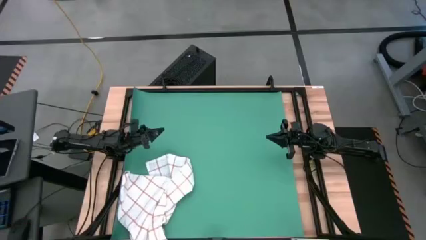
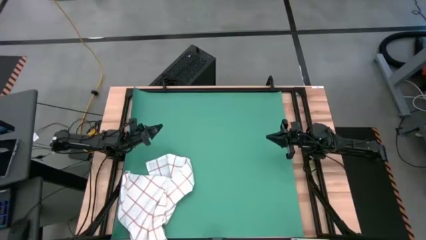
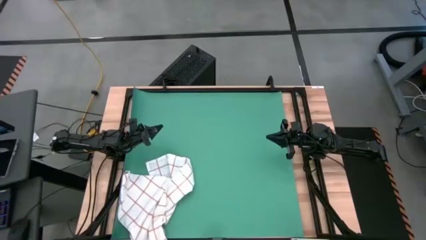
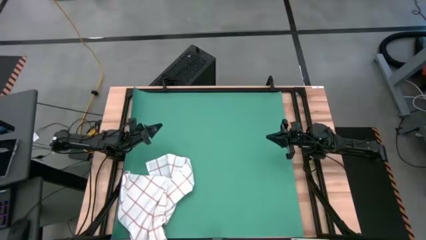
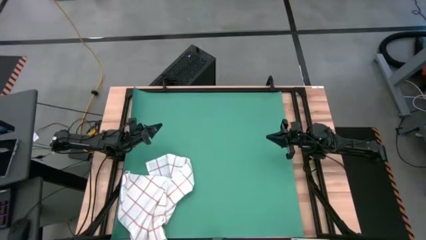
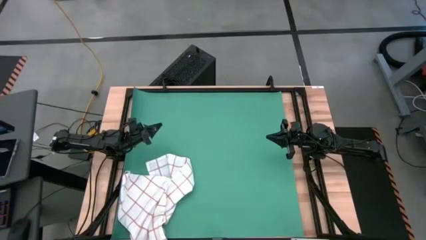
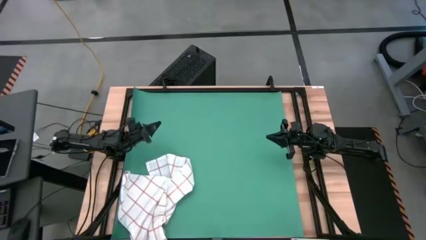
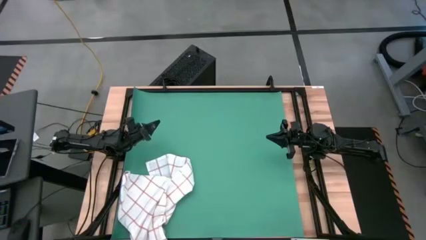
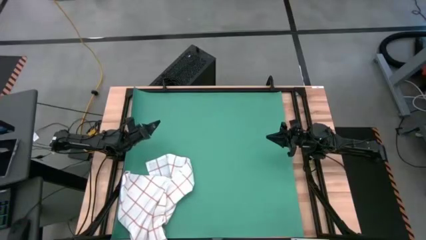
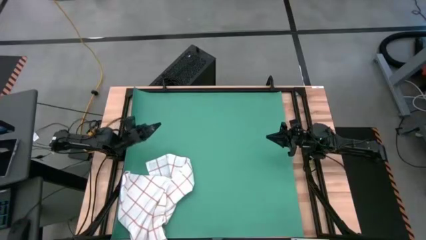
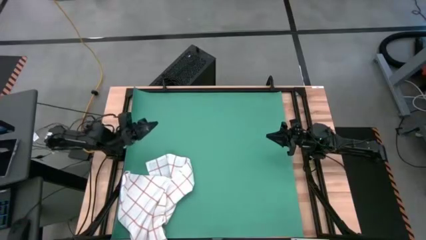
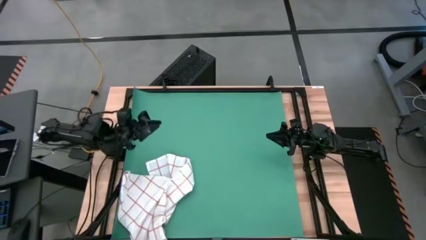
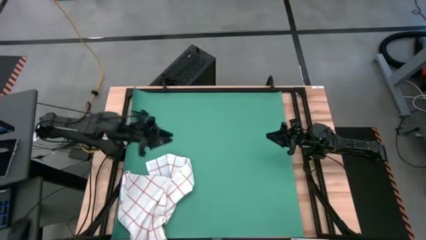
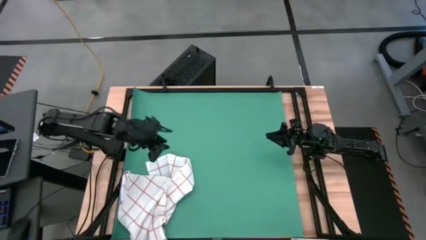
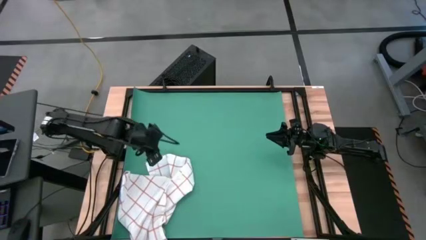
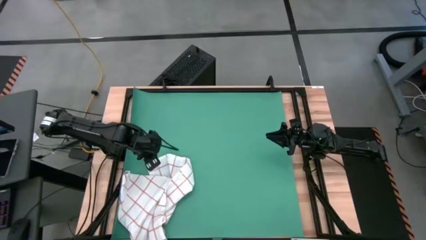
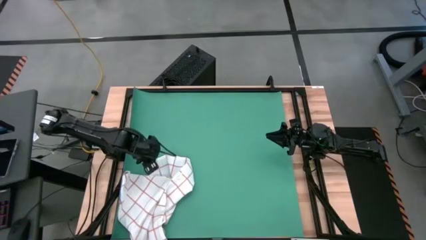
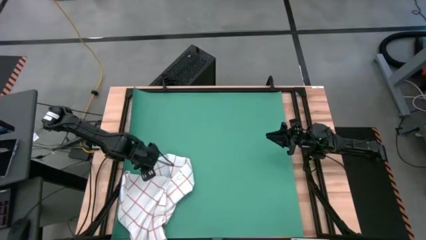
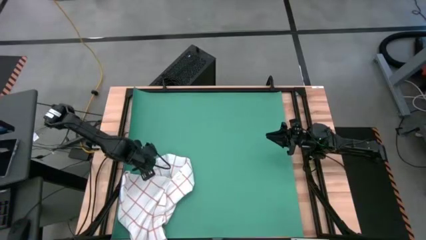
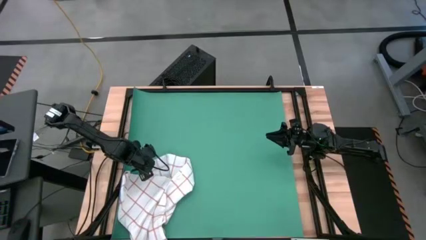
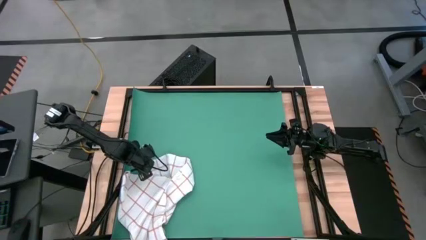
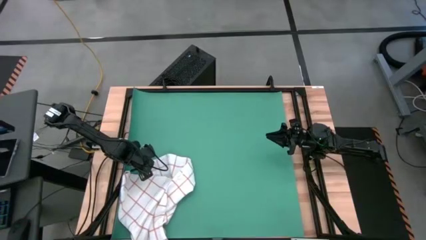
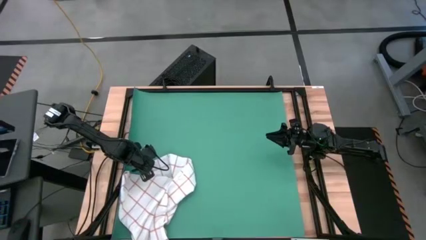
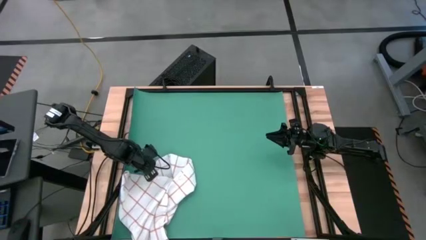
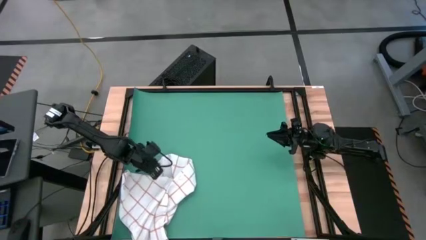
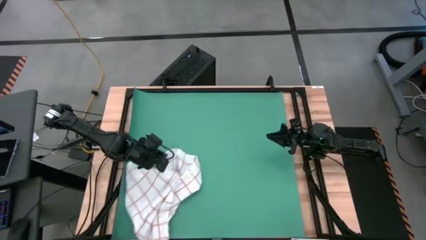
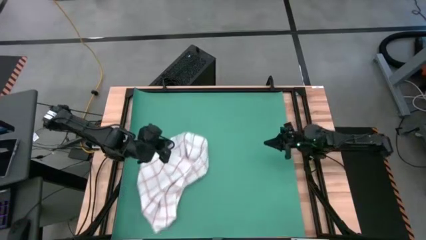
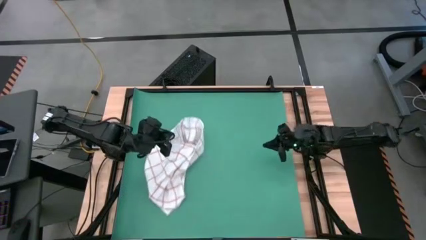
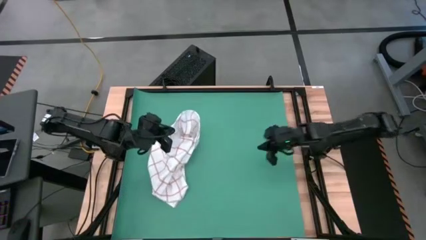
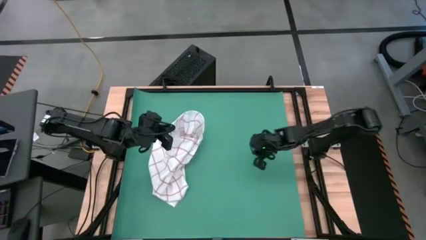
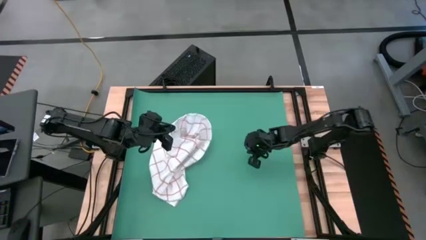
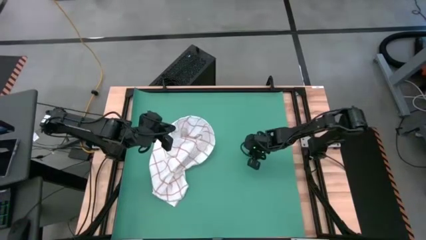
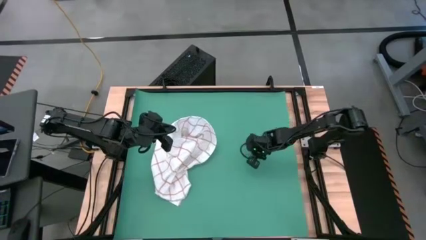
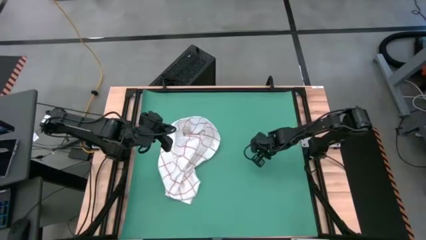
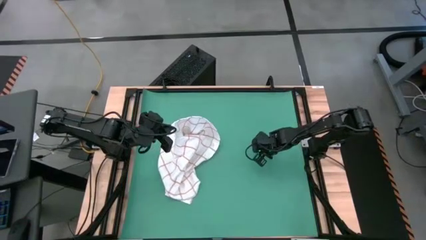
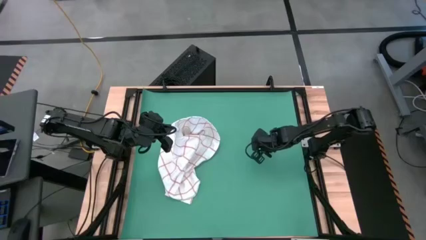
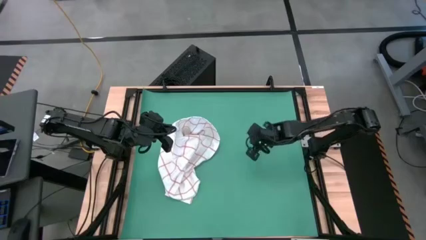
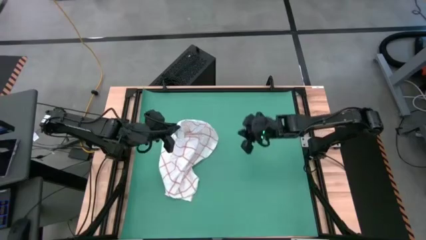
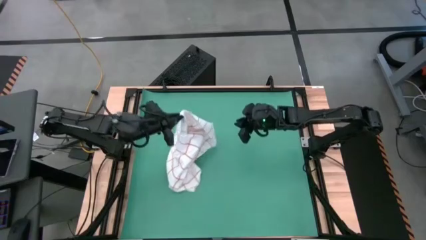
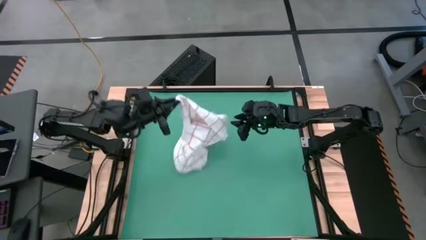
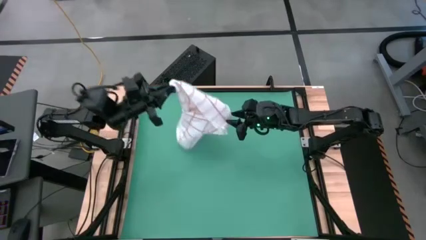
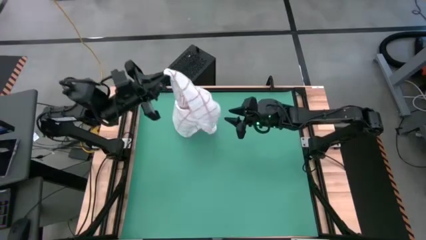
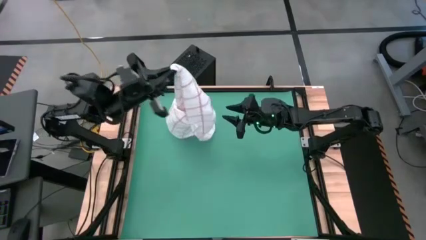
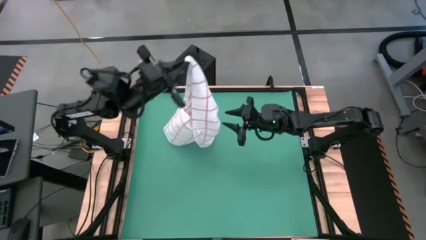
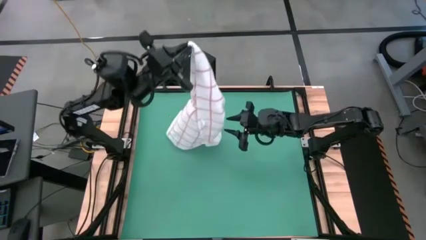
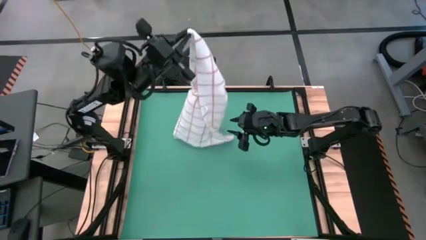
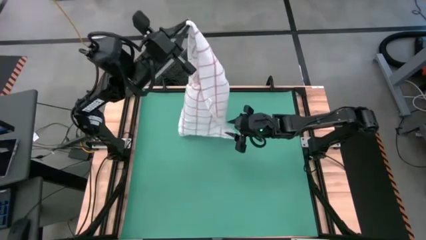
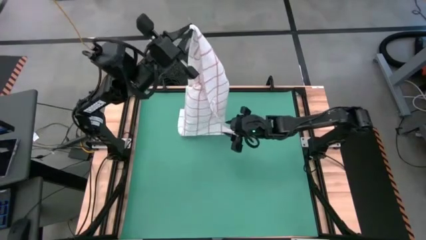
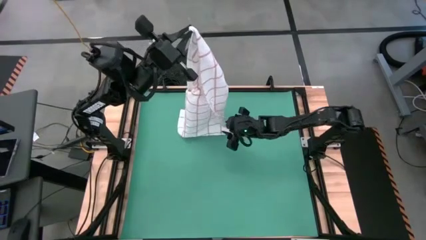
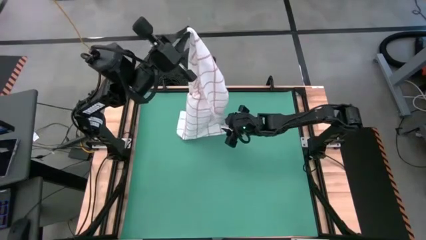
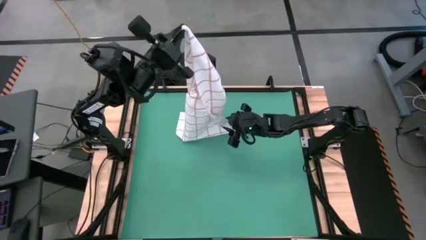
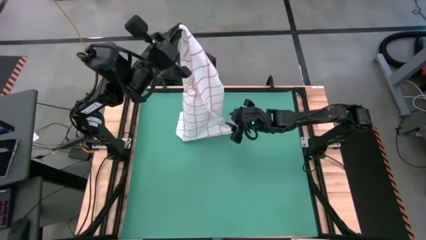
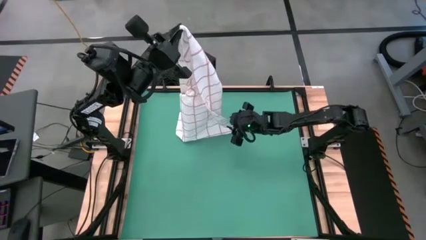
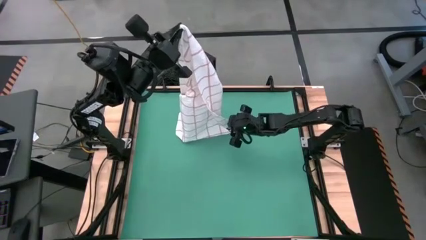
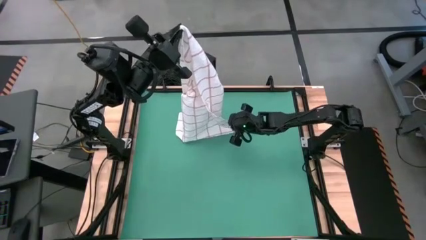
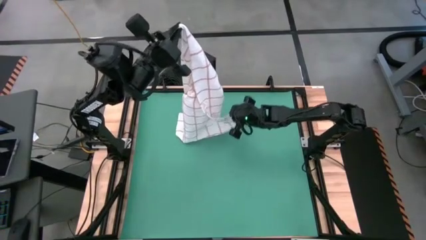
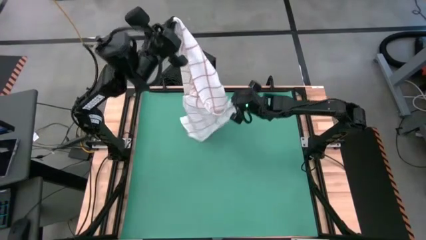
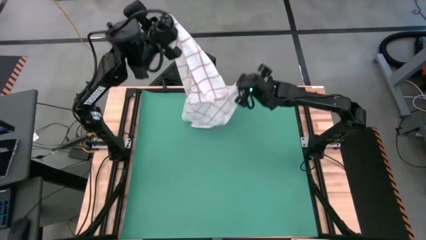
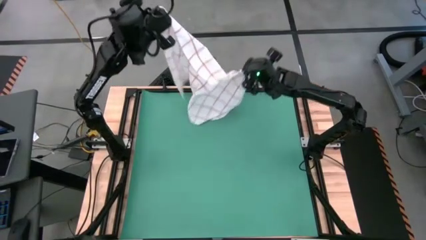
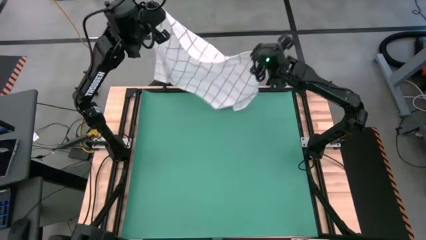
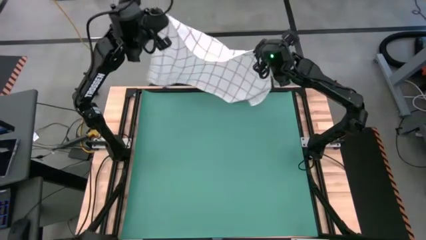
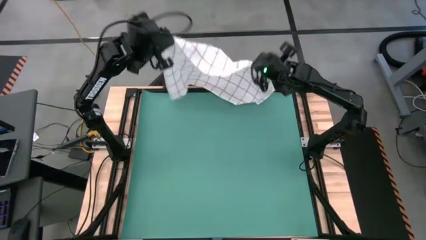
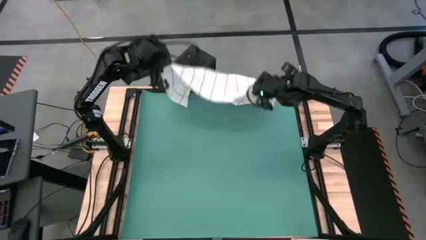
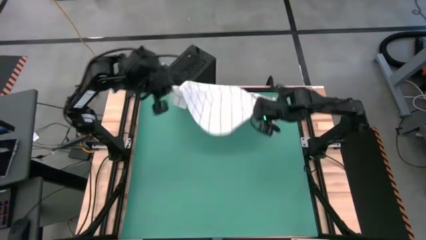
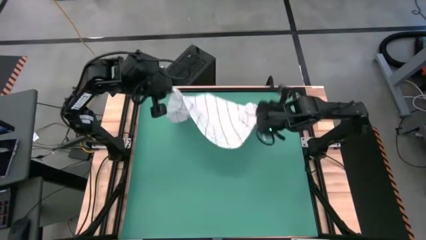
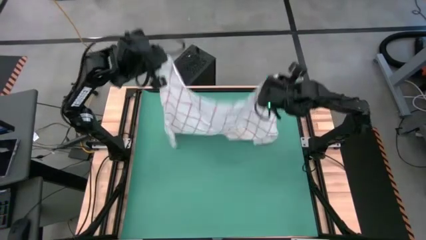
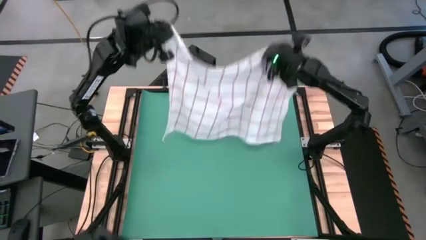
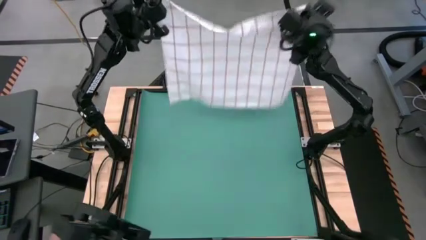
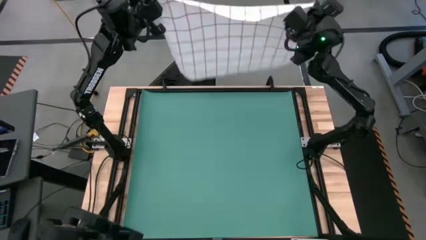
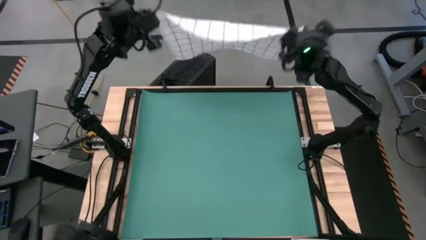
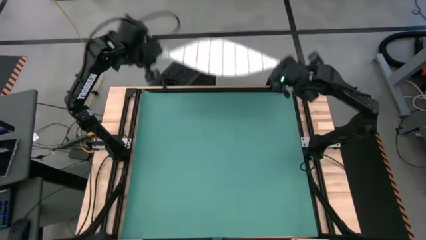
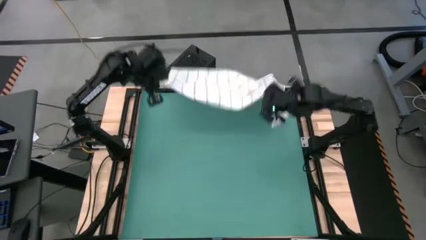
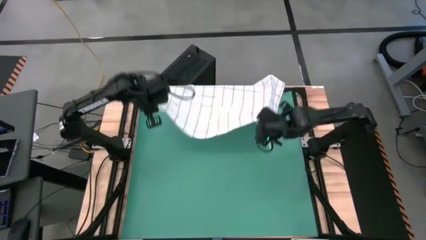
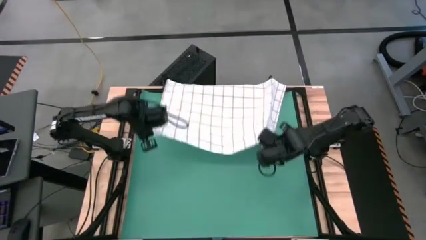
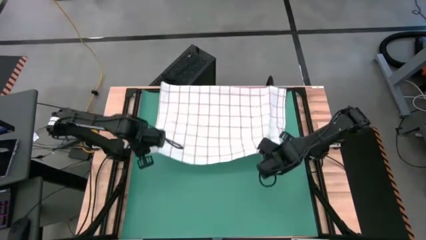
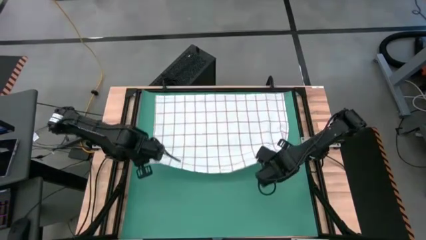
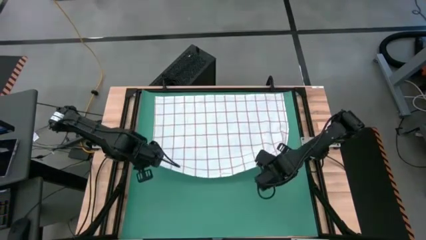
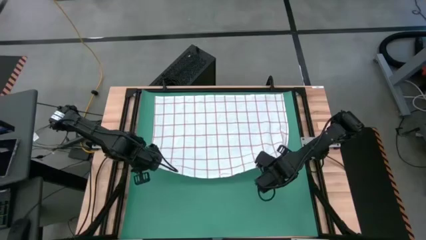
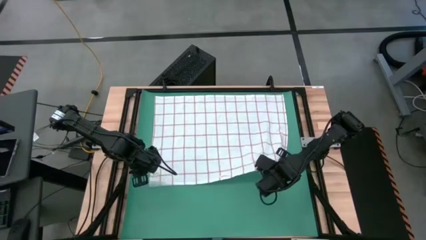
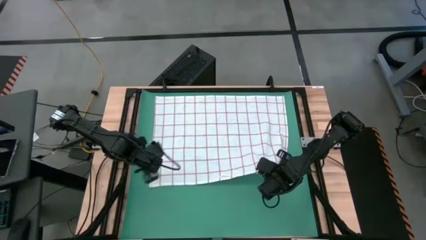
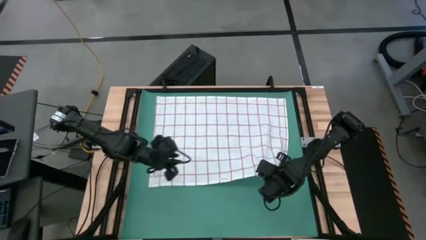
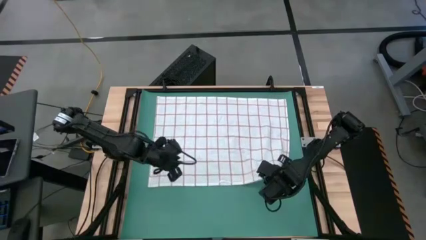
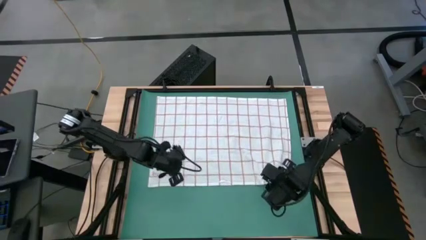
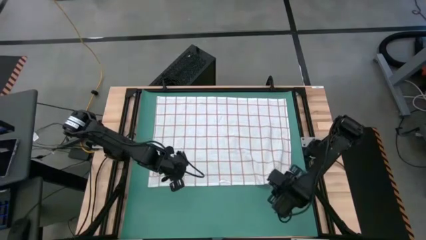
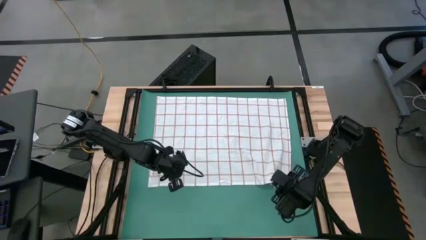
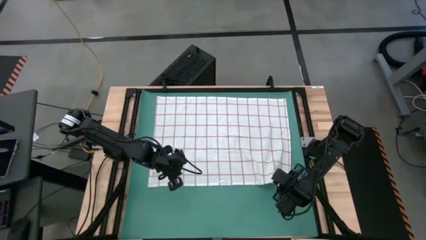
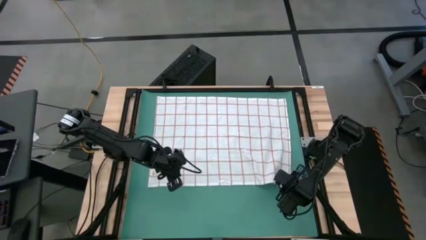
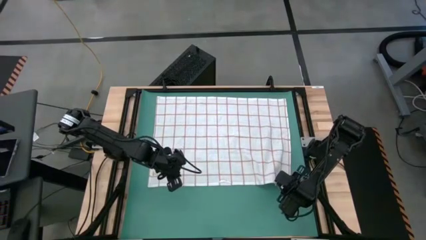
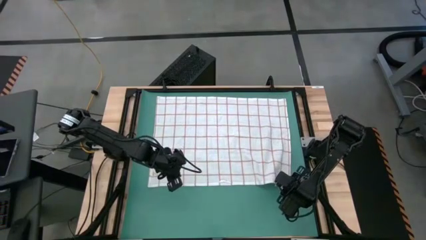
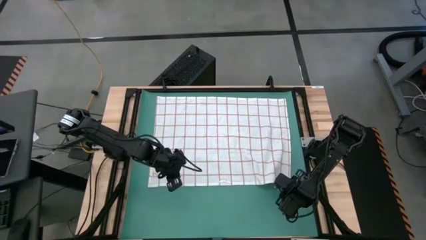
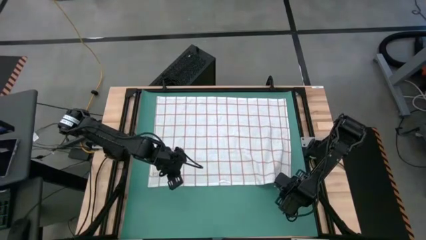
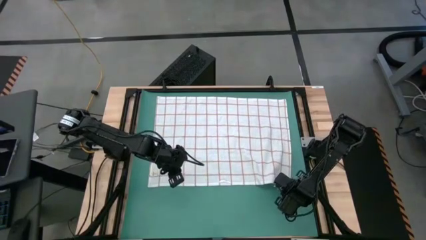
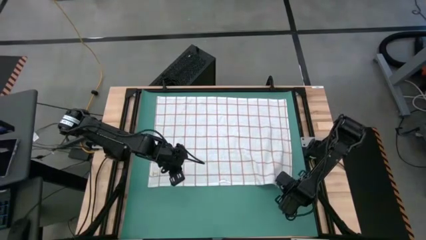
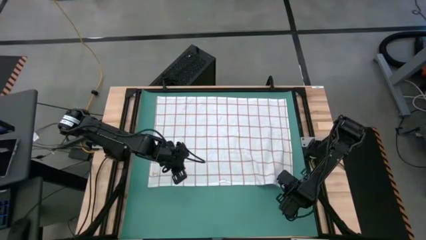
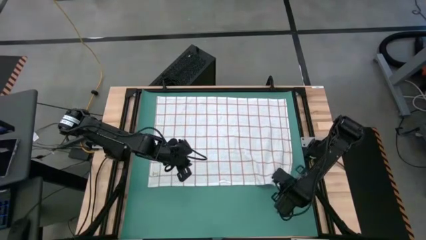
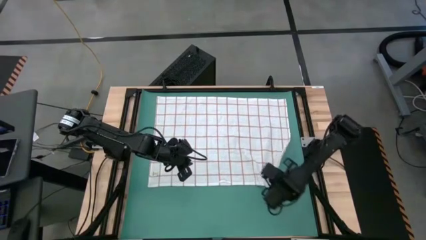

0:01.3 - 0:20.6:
Task: Roll towel into tight, uniform cylinder
Roll the white towel
